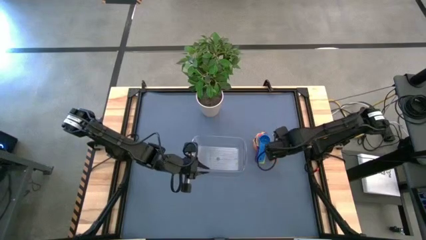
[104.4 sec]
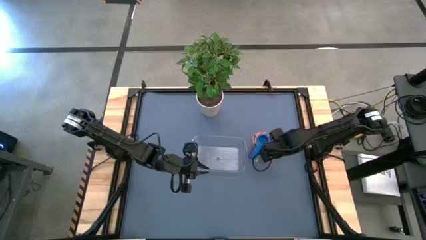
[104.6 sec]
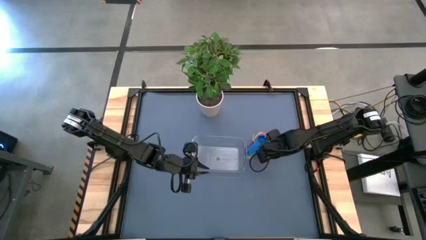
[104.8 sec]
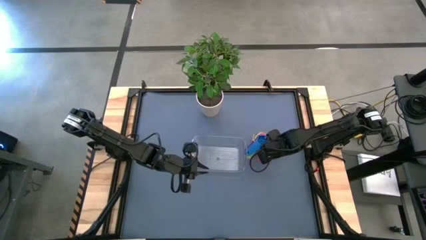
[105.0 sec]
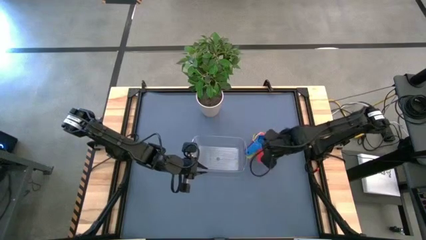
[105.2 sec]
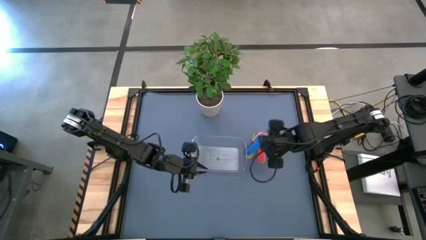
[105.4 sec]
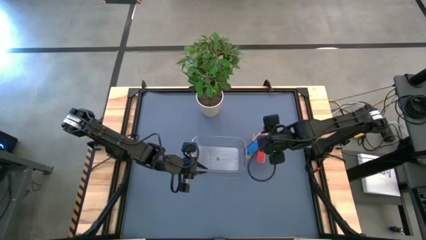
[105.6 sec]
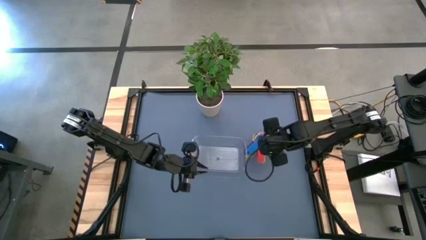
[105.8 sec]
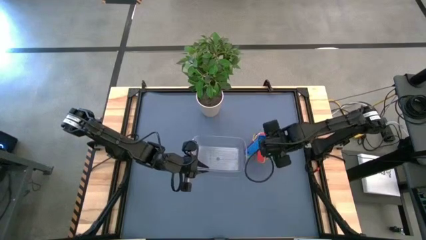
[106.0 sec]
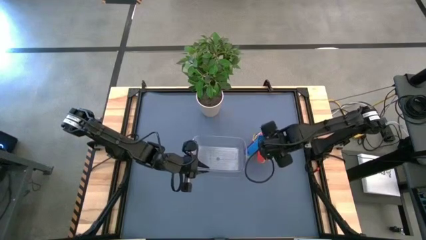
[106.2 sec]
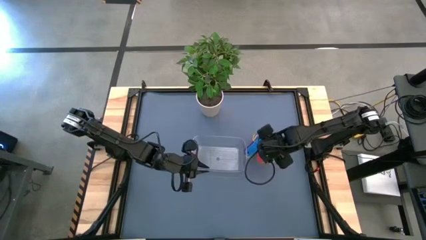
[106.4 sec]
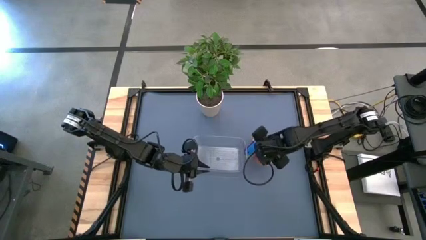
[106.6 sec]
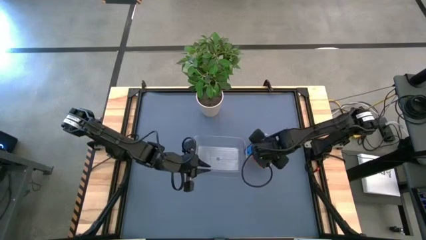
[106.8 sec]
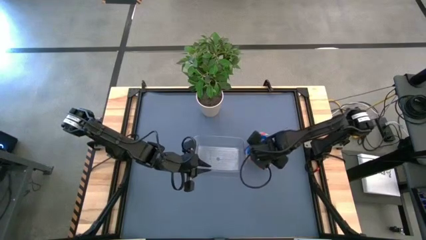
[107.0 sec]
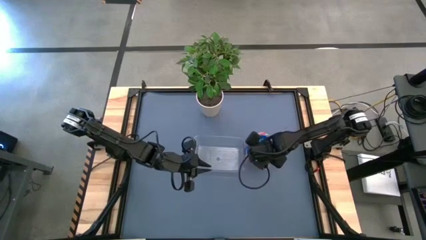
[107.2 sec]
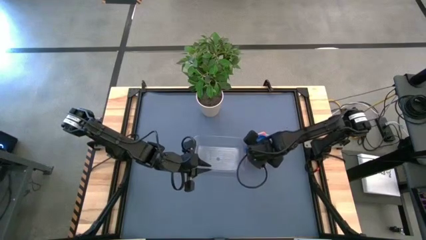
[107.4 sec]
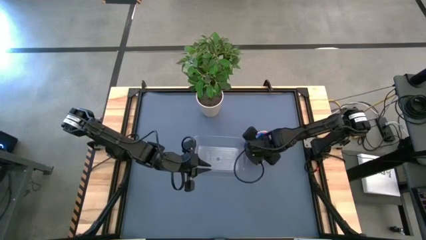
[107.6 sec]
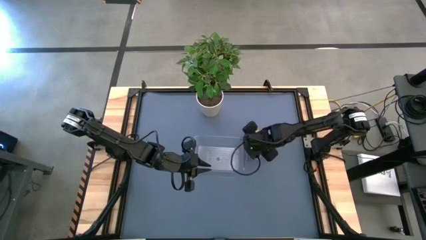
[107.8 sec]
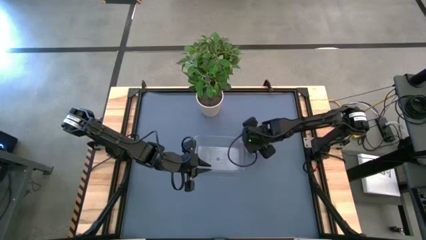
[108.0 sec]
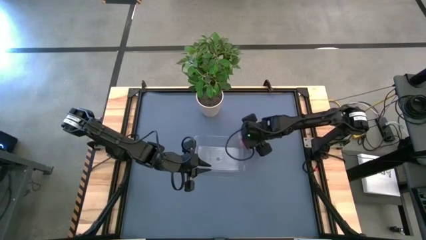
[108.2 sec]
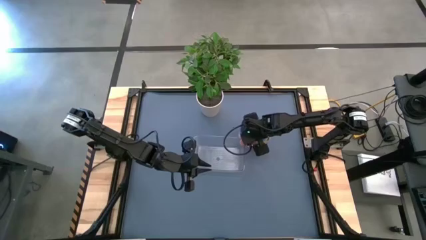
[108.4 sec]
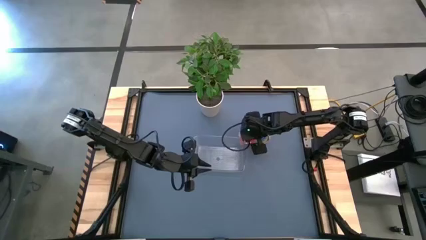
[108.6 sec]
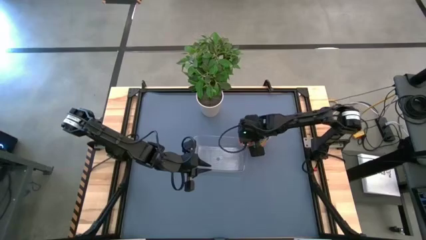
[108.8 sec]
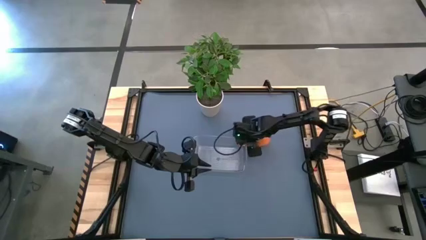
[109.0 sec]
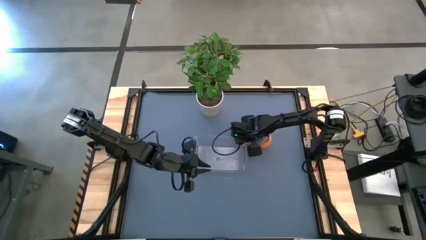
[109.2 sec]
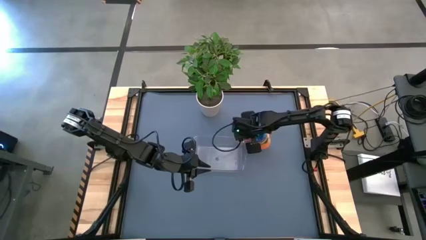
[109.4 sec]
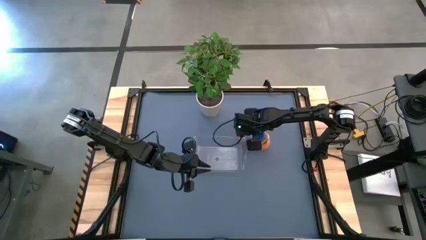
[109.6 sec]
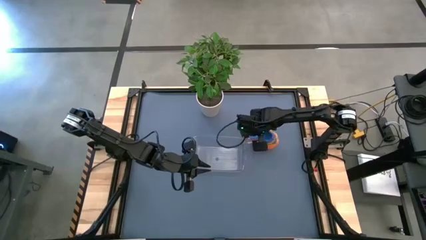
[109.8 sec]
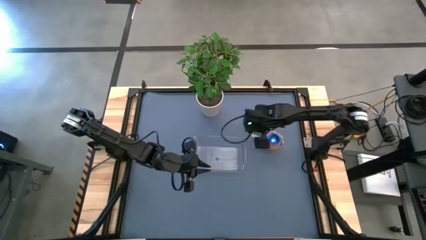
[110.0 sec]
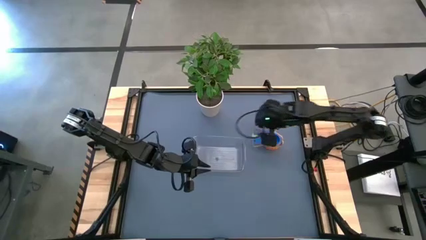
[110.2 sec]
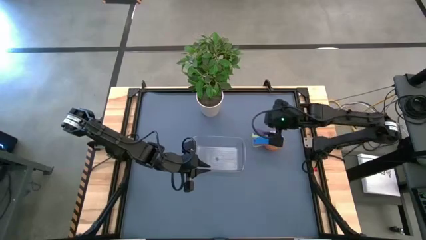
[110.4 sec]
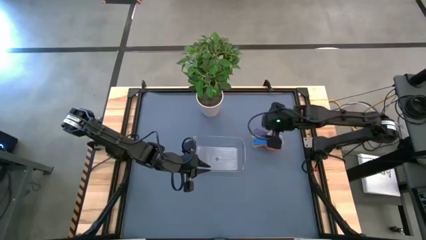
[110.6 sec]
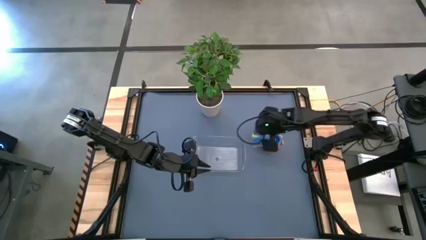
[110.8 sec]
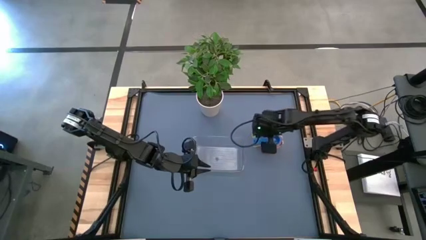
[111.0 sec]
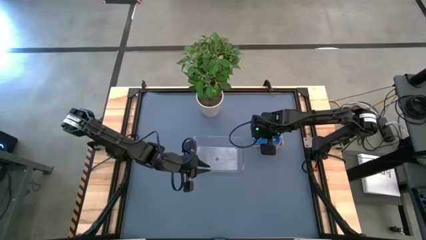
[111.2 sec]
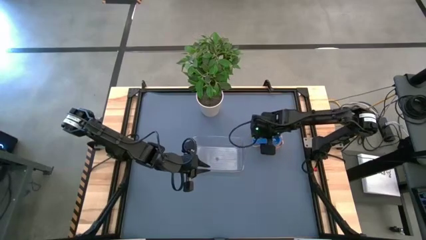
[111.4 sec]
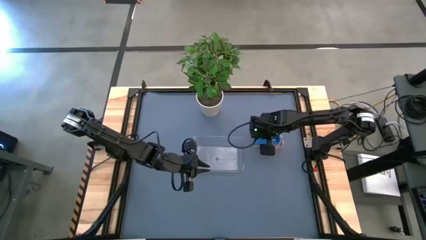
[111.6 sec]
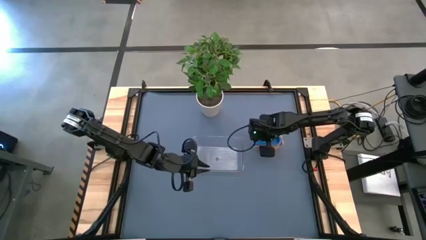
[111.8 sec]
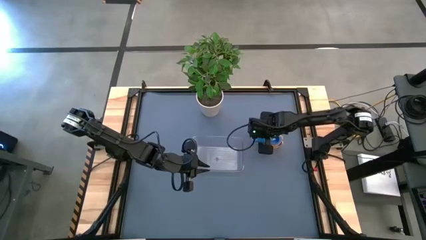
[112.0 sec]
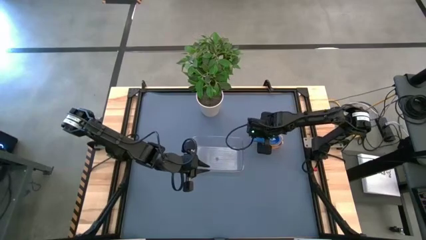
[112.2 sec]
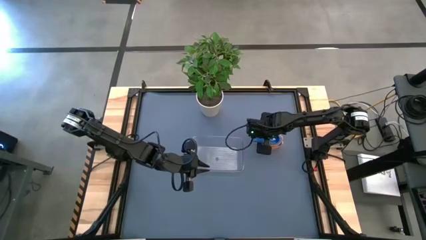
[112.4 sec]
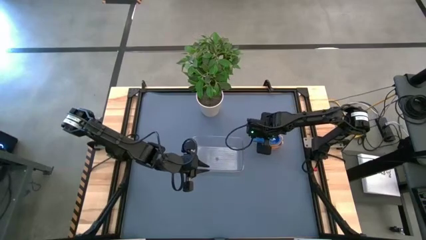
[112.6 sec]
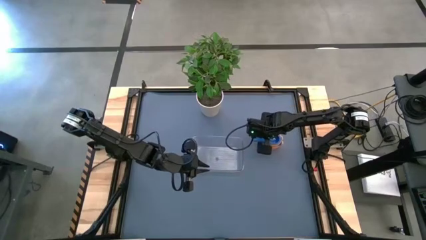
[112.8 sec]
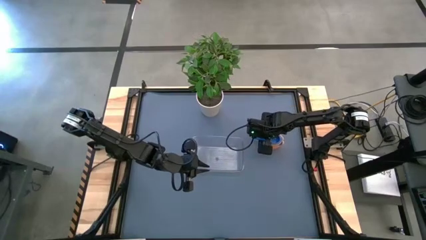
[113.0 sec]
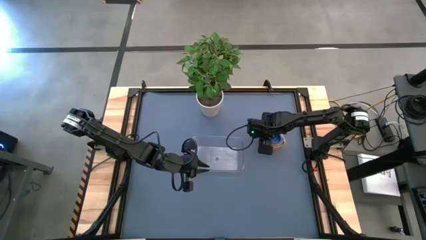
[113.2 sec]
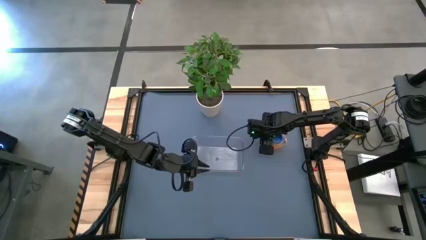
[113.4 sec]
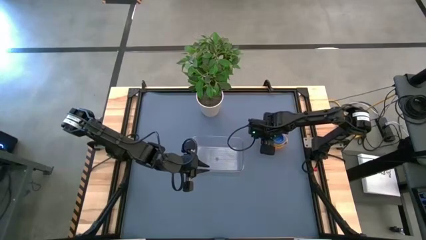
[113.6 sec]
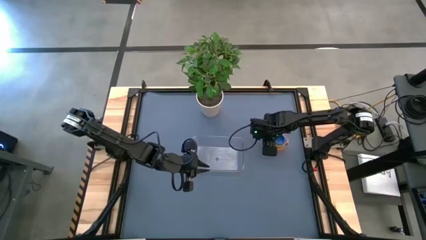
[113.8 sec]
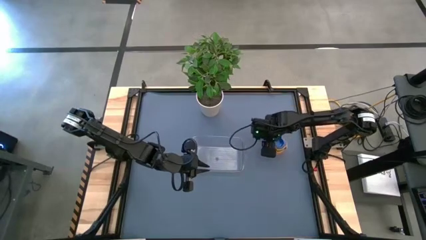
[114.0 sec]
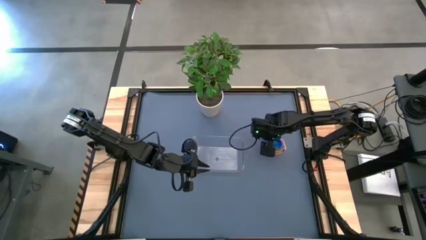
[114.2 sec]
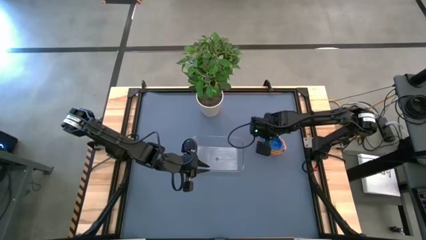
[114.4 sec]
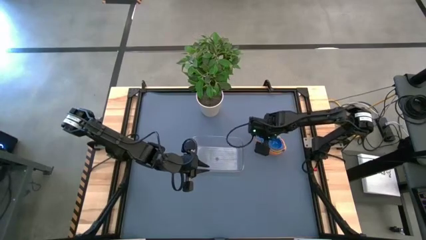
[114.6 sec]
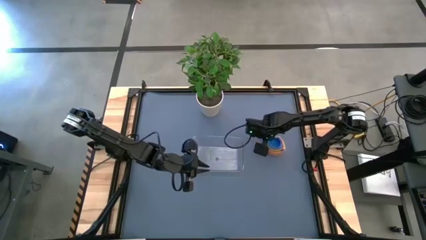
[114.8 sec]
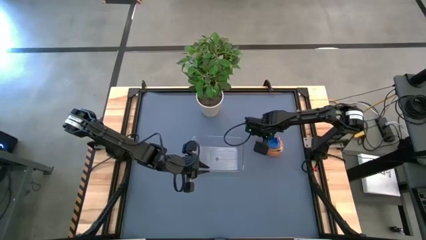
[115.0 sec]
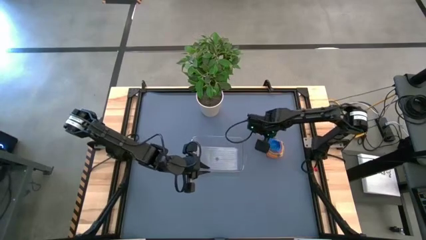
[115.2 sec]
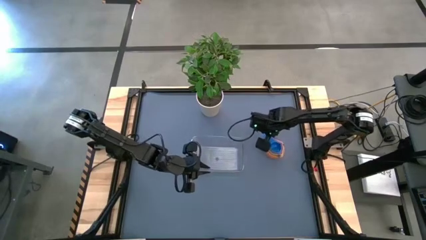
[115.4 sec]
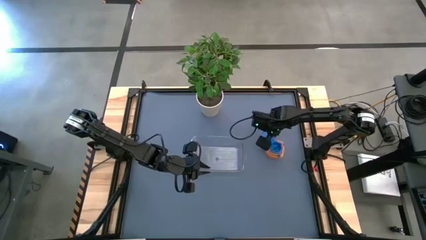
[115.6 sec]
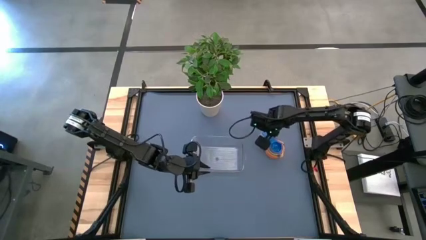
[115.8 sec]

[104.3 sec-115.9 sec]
Task: Nest measuring cups in basket
Adjust the stacked measuring cups

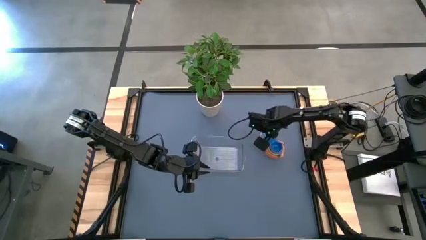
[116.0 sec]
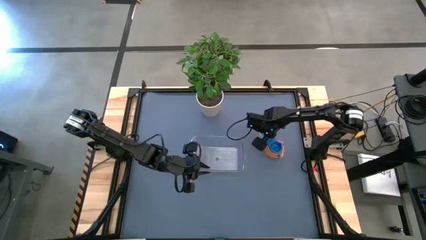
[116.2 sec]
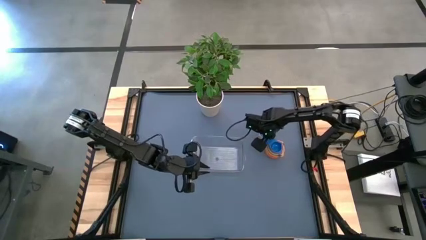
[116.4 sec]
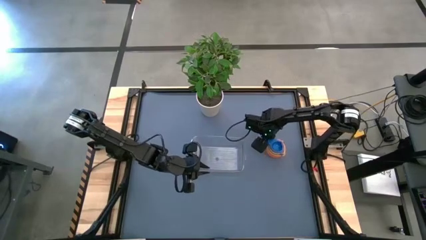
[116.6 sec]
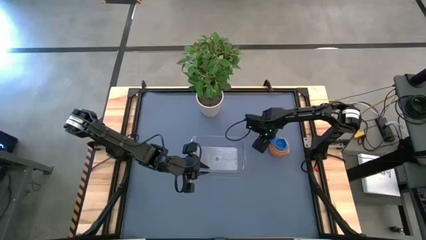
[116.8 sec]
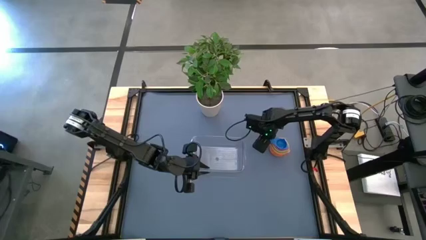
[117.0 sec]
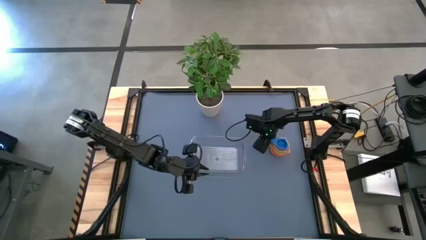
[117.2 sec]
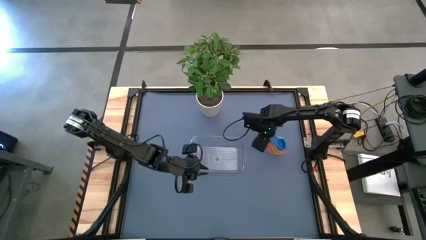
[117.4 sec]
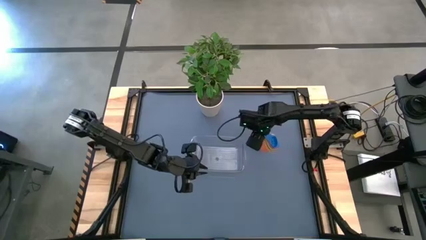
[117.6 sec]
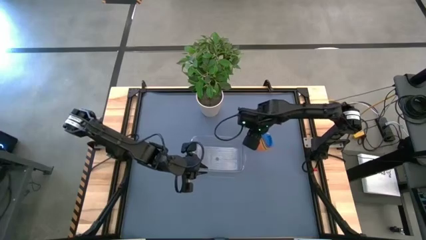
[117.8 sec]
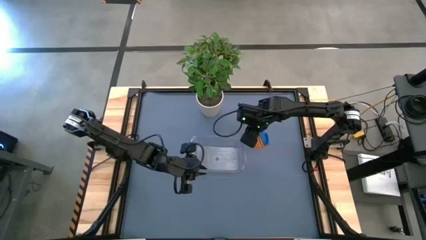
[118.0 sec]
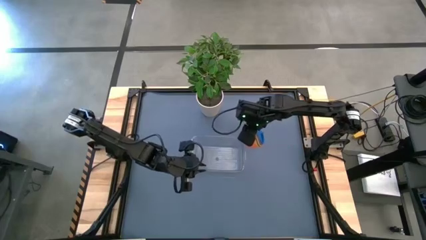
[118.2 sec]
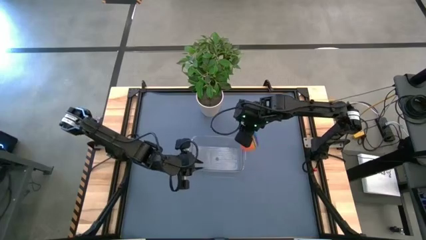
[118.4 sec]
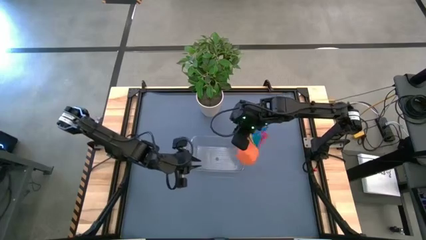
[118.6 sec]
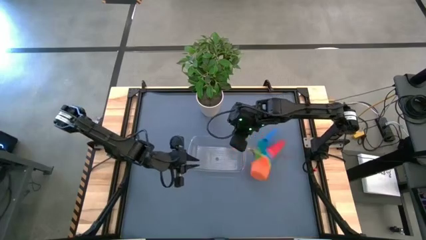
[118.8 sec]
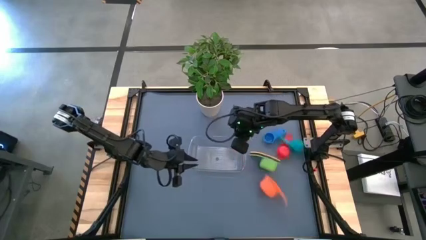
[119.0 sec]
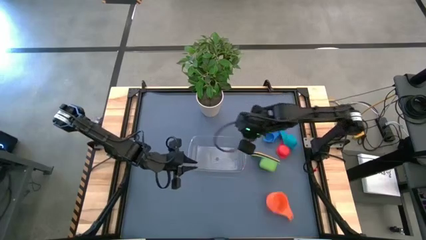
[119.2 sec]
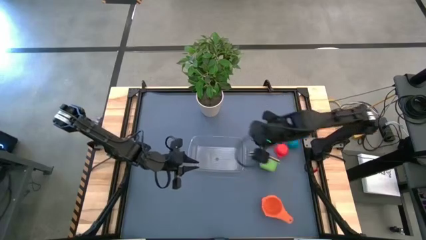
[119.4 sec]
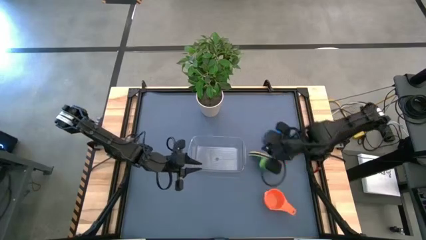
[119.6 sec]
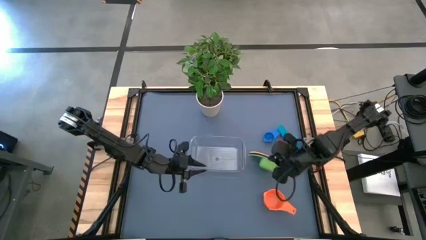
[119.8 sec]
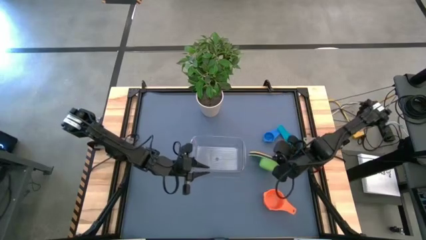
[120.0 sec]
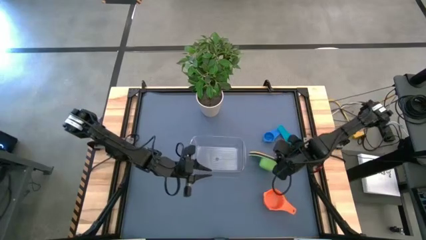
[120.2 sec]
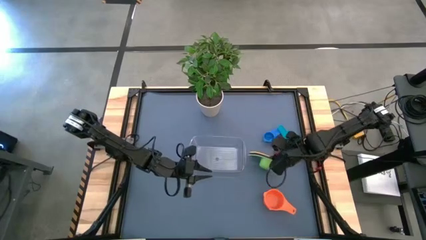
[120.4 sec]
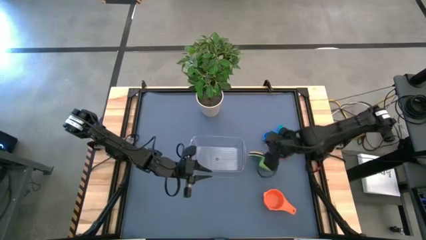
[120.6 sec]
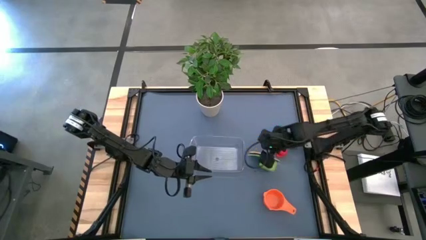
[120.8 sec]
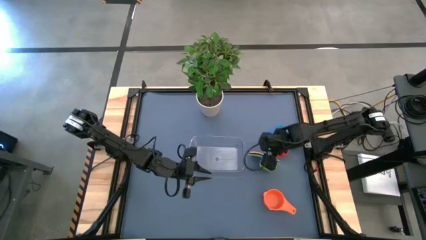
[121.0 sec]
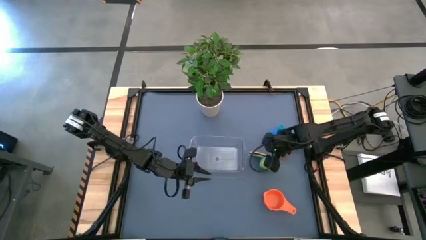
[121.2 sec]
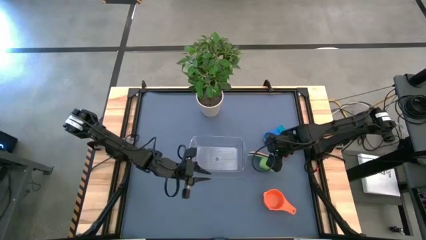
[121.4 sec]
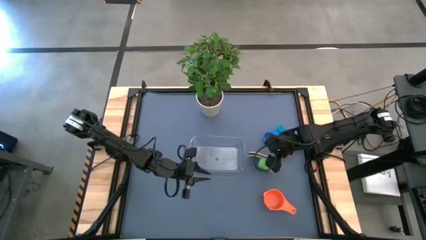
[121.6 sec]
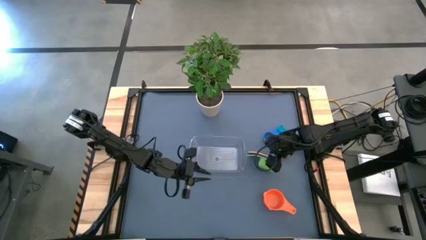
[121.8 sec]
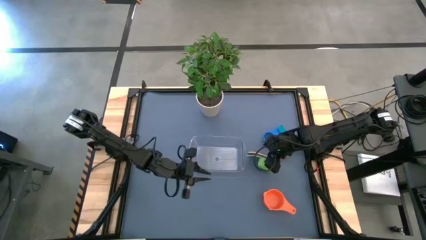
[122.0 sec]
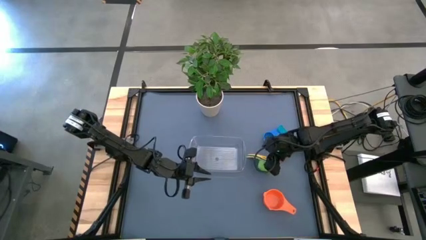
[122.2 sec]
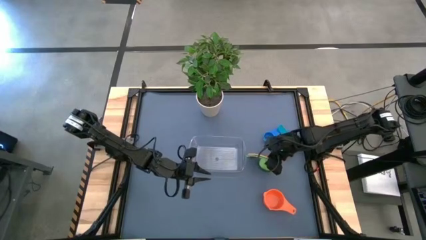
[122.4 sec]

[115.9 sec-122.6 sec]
Put the stacked measuring cups into the transparent bin
